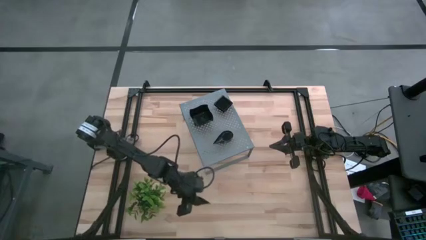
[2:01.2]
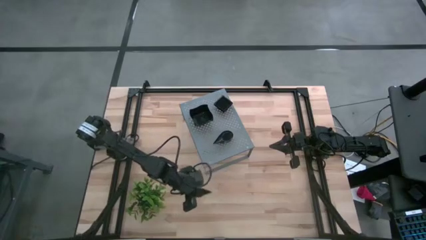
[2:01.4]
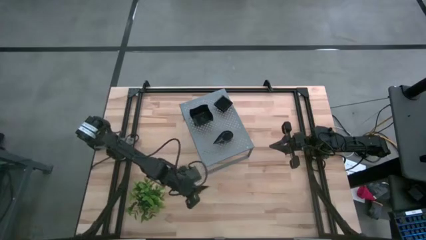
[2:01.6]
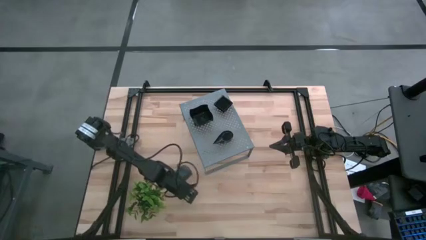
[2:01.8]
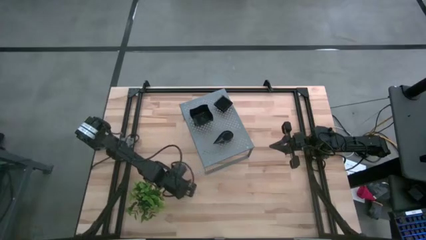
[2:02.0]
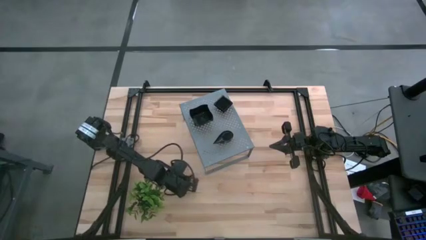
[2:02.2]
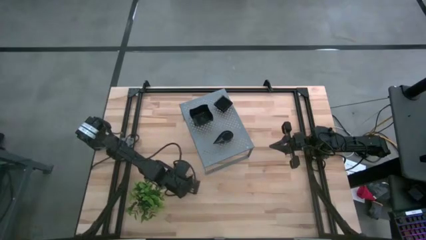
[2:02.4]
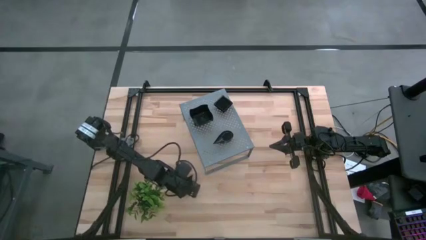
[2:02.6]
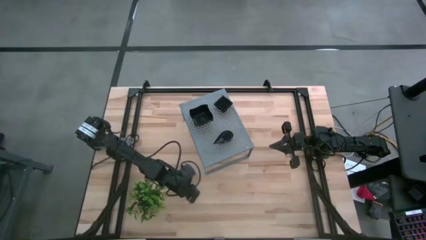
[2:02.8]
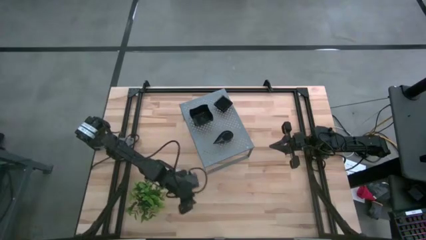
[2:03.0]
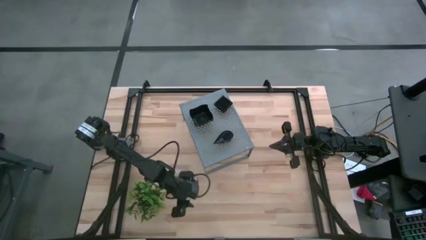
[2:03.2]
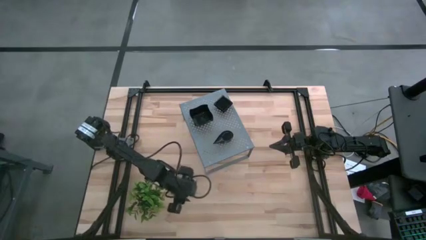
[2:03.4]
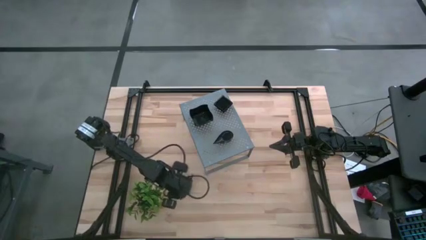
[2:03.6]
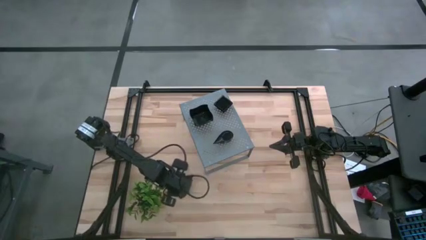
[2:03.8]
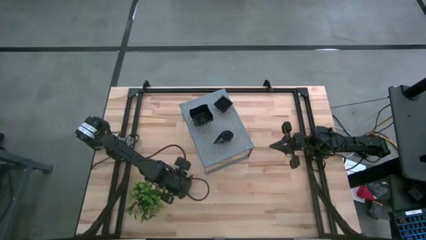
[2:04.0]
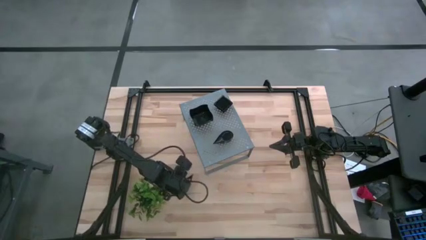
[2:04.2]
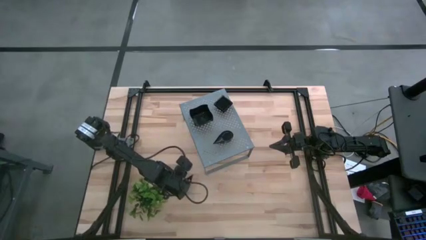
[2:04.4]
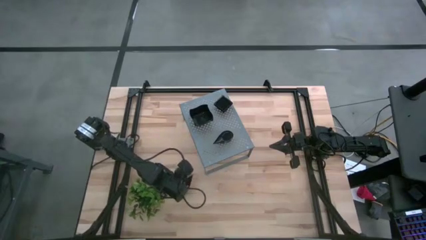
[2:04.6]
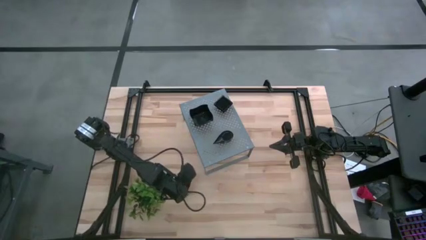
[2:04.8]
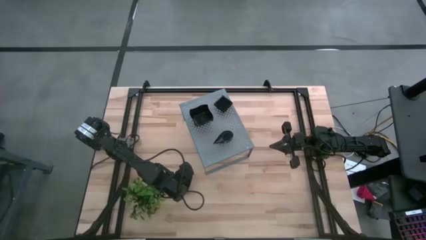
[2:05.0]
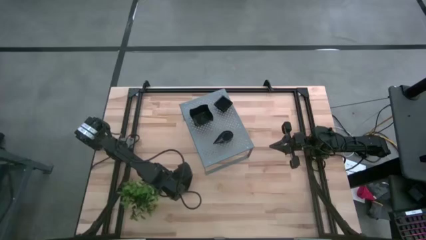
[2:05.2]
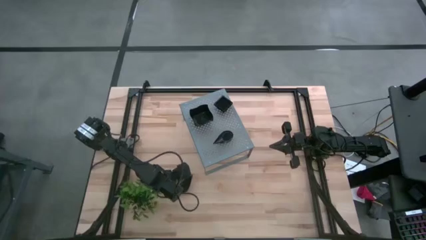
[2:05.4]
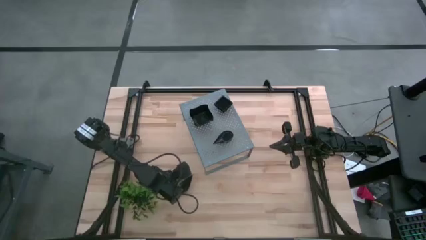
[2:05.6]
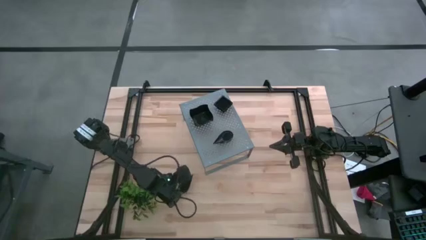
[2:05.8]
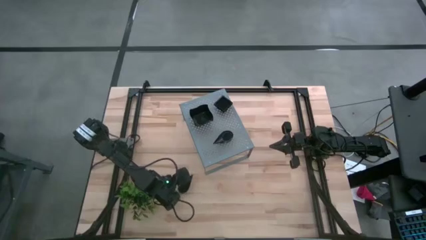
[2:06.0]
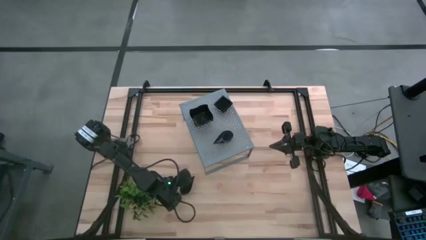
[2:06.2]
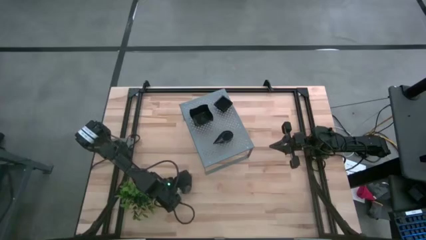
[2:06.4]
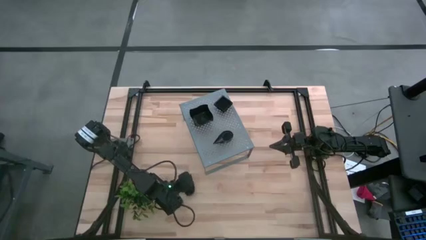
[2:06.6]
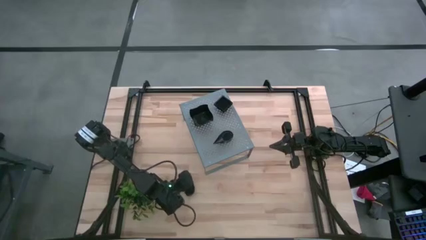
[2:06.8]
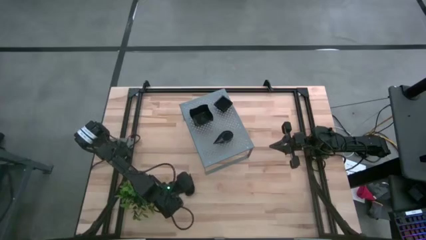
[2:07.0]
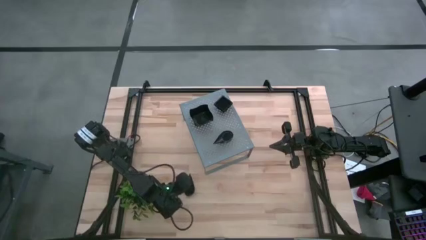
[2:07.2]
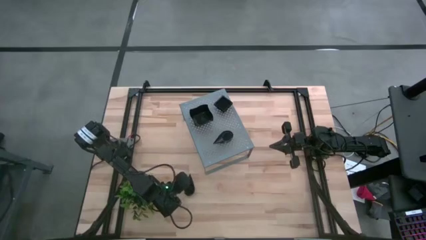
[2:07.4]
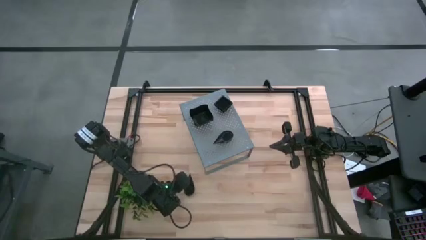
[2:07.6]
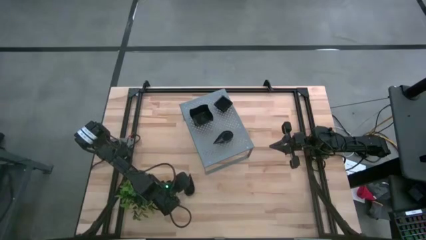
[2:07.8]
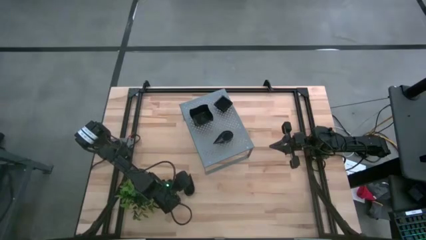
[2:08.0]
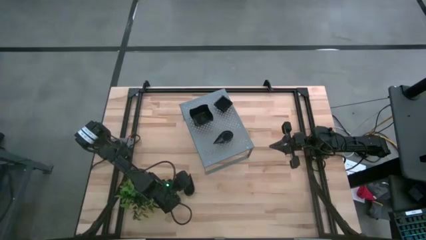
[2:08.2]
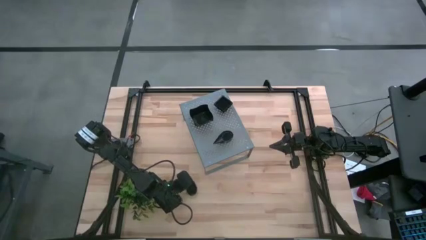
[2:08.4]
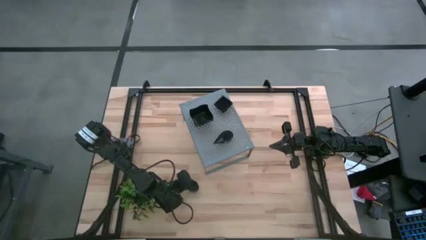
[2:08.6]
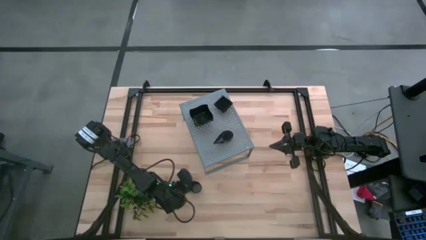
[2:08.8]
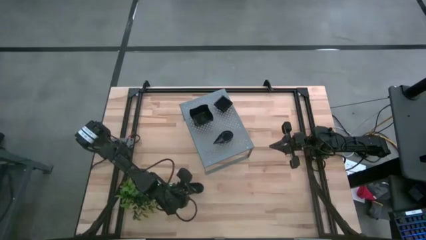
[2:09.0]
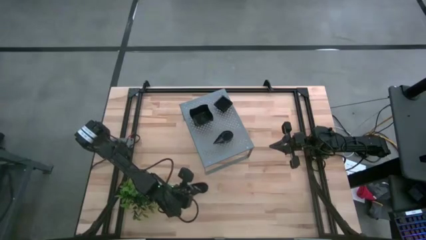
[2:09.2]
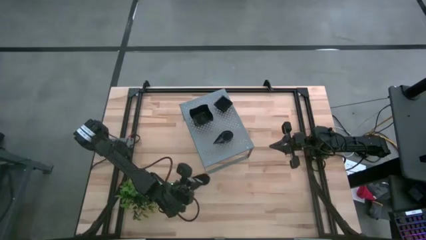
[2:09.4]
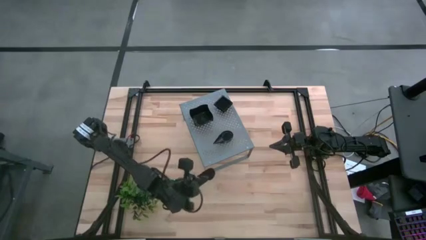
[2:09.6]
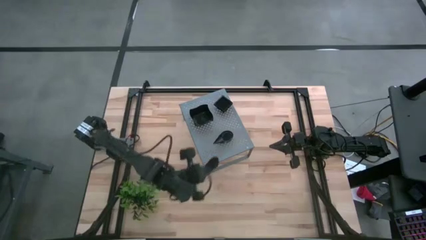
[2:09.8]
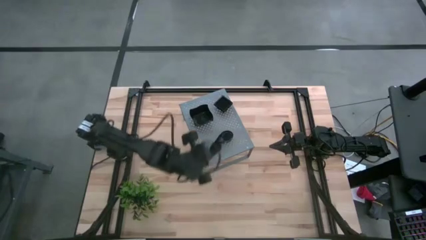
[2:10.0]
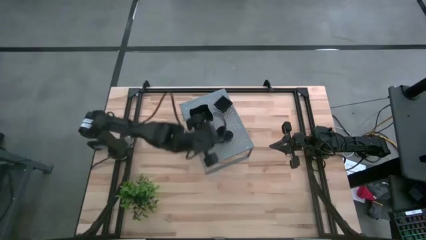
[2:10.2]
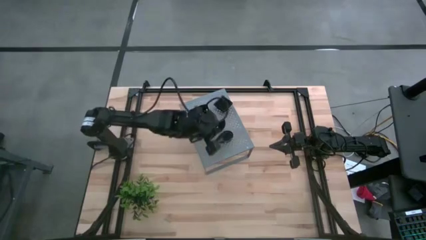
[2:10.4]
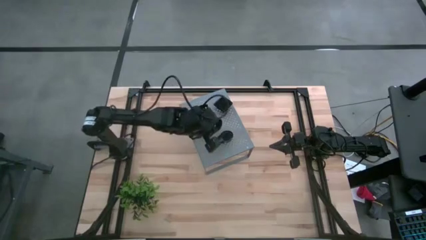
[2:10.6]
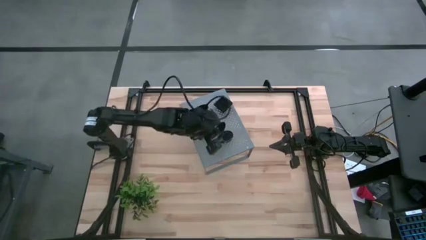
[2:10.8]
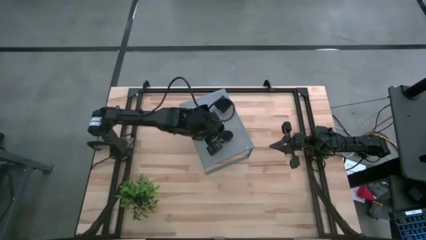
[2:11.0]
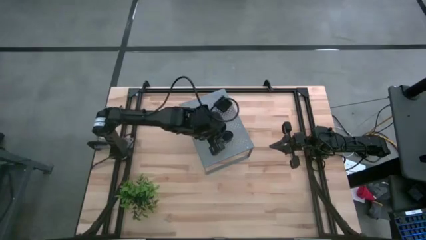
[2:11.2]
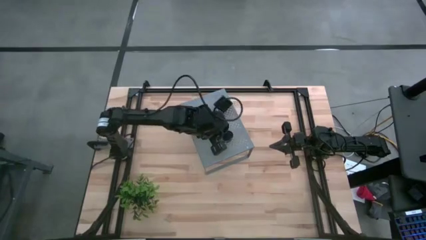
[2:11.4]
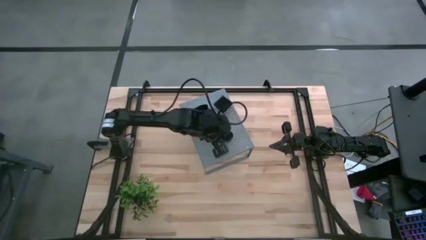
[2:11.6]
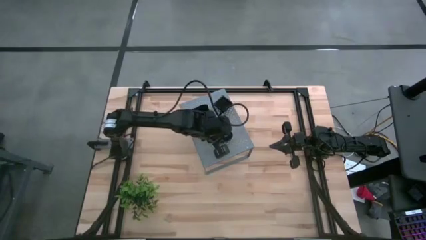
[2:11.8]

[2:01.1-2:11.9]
Task: Pick & Place Mini shaped plates
Stack the distorted square plate on top of the distorted square plate on the shelf

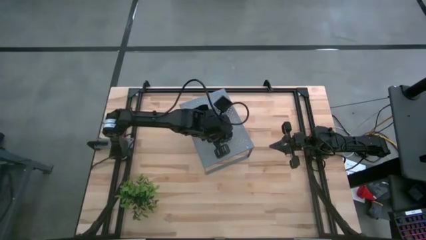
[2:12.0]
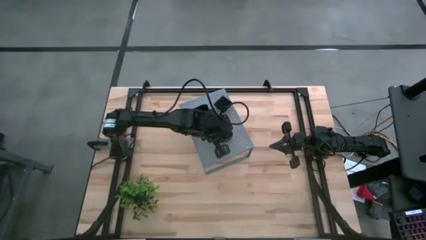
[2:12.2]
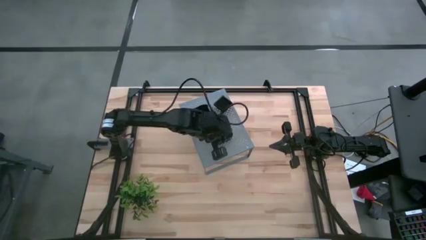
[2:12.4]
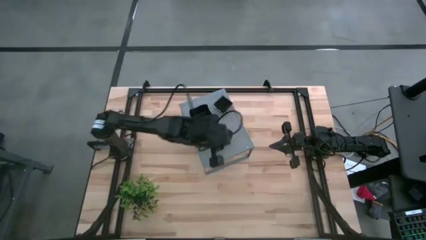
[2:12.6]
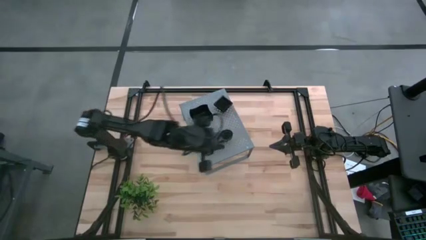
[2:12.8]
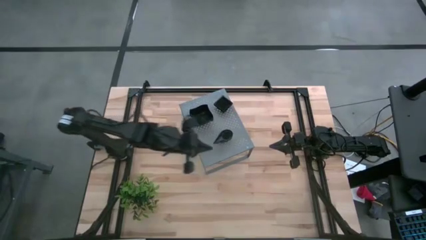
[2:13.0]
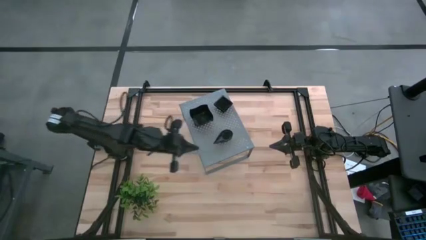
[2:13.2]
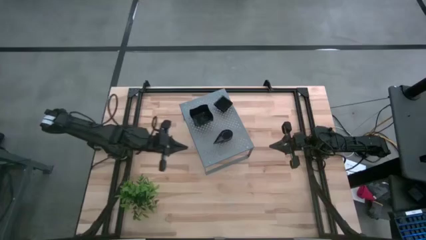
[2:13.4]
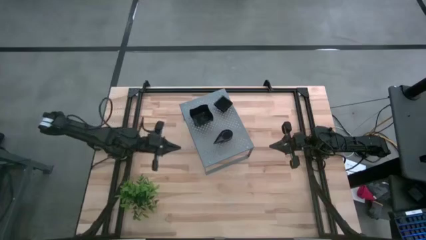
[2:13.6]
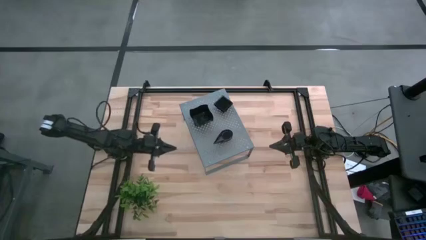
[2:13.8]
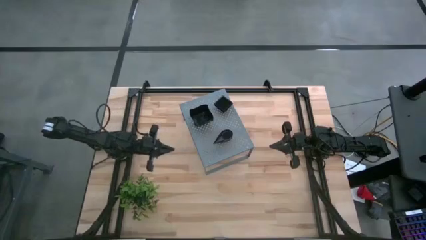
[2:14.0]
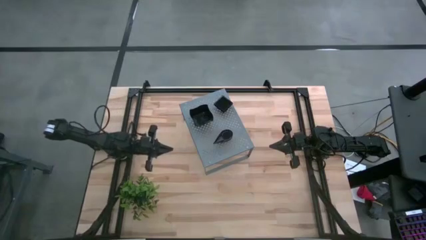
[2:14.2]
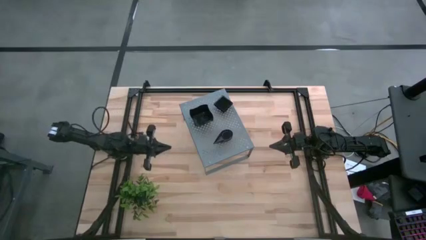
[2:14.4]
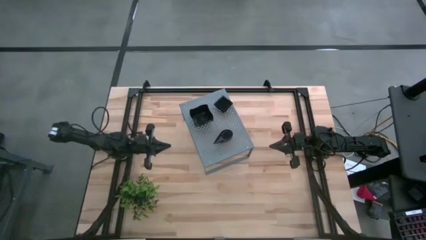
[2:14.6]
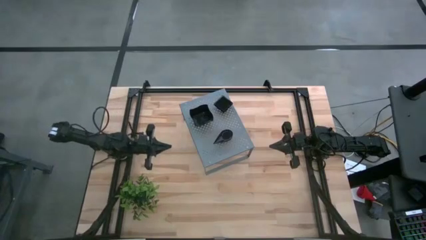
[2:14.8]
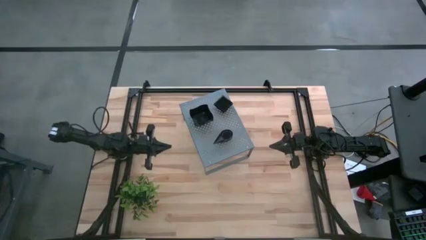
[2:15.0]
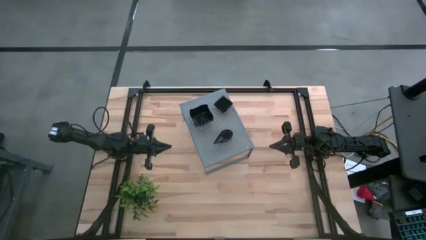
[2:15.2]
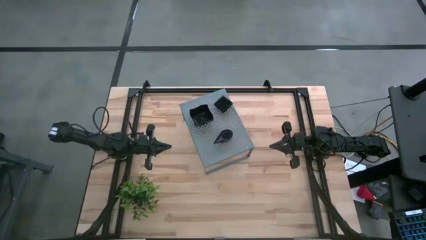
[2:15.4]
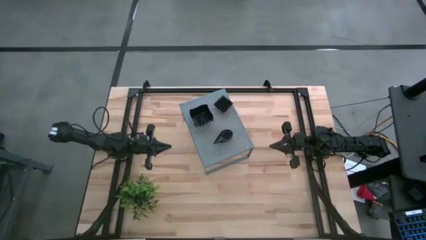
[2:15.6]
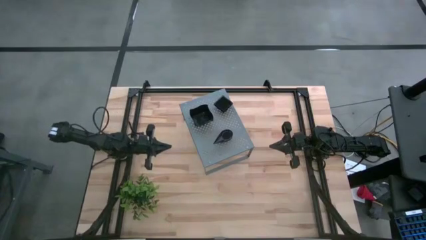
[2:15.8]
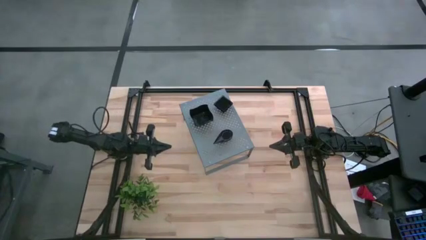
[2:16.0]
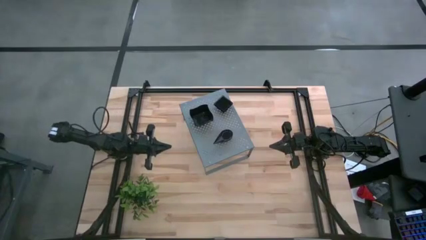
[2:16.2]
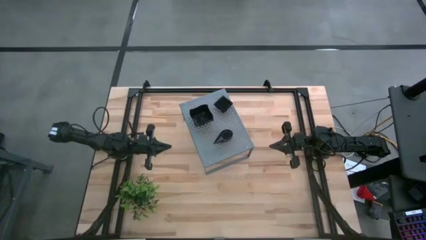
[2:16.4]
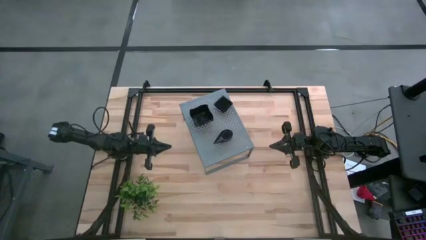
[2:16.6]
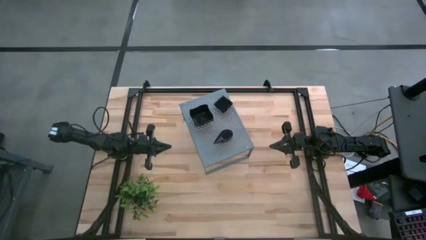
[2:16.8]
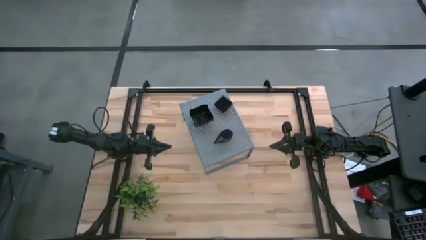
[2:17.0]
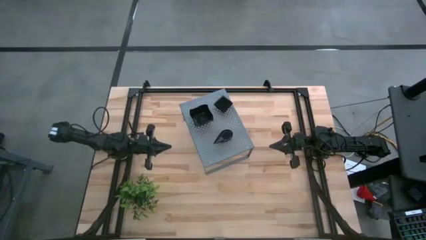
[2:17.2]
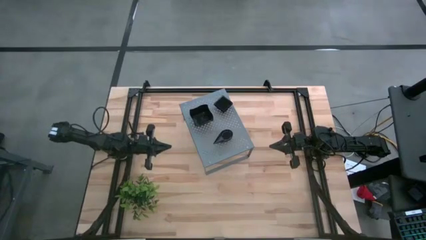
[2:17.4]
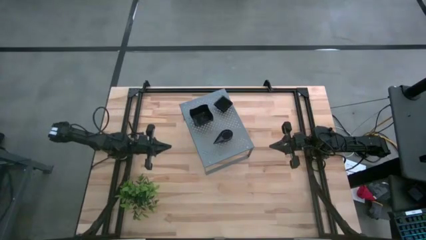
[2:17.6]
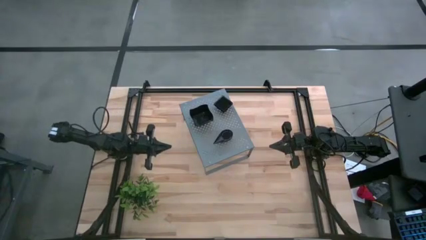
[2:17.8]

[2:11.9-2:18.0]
Return to Home Position
